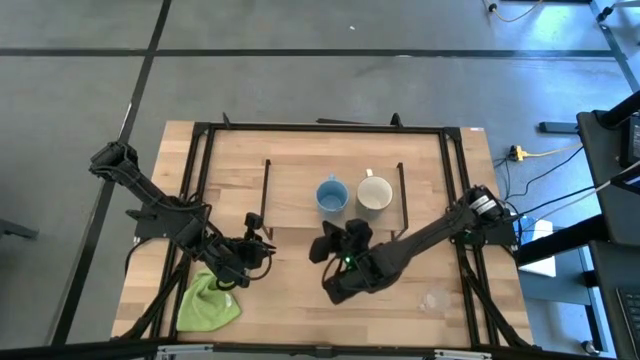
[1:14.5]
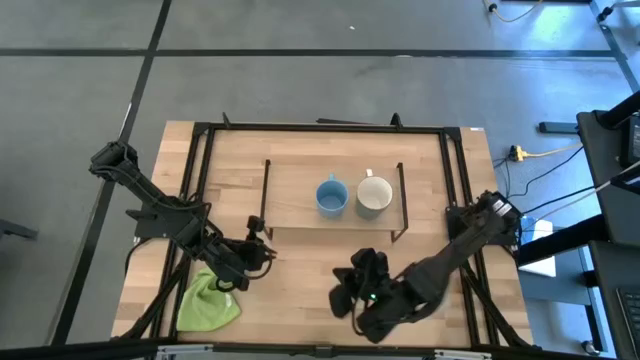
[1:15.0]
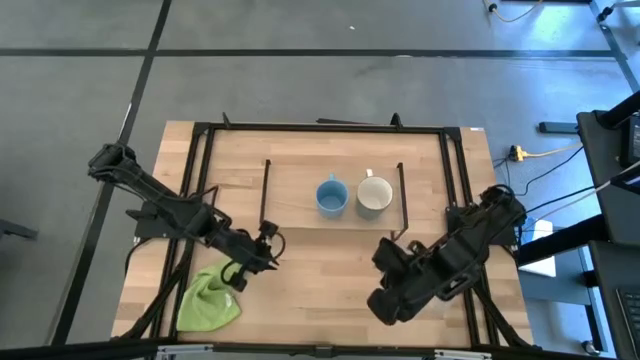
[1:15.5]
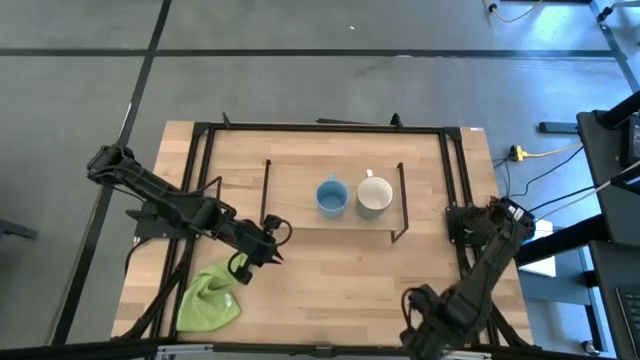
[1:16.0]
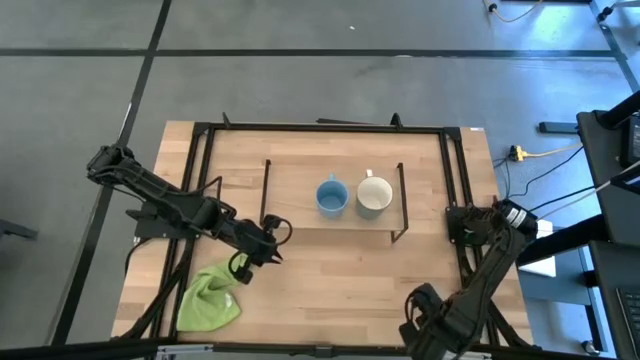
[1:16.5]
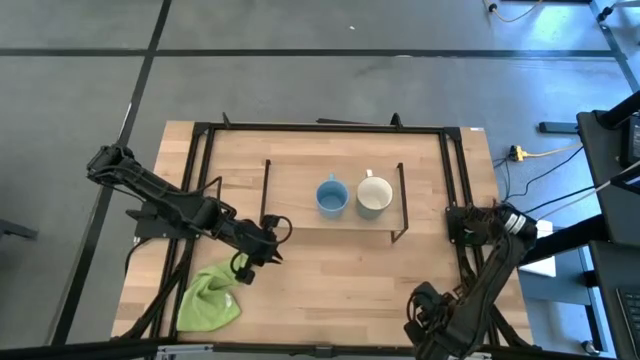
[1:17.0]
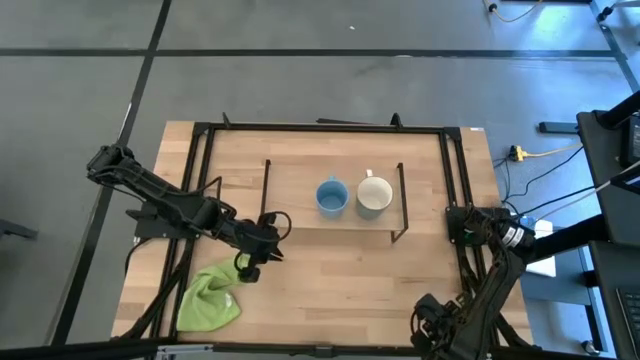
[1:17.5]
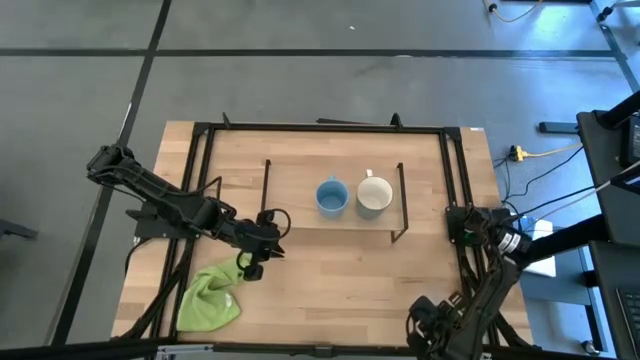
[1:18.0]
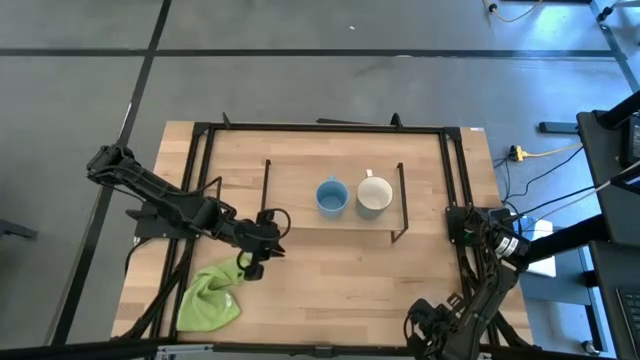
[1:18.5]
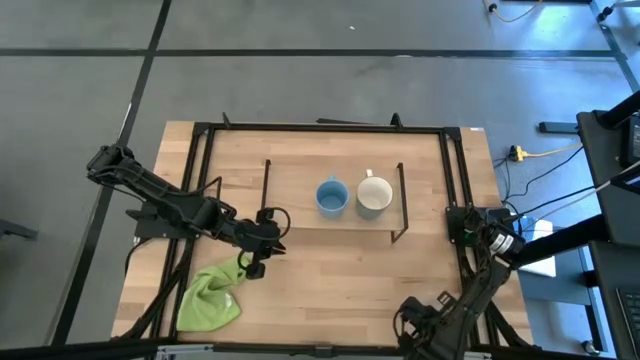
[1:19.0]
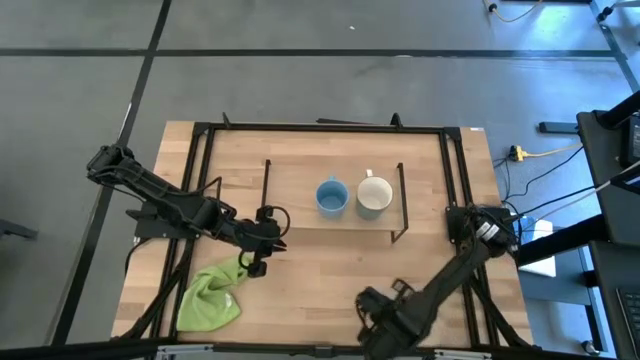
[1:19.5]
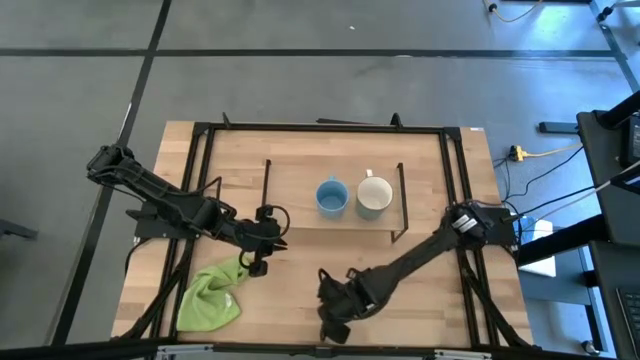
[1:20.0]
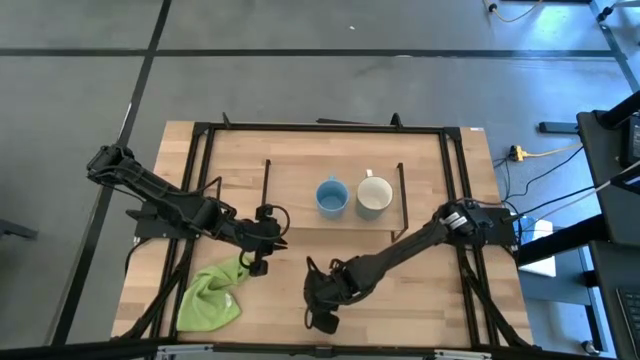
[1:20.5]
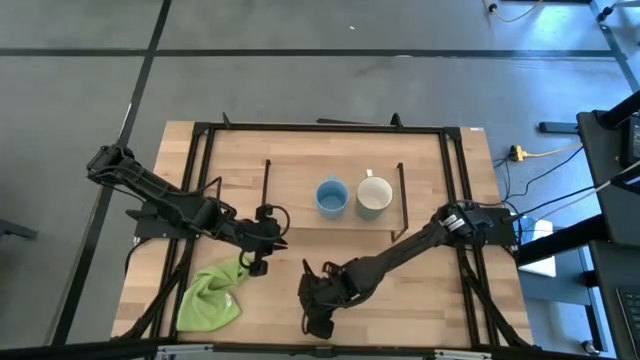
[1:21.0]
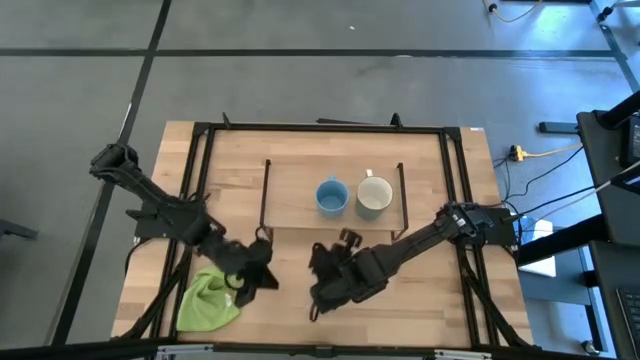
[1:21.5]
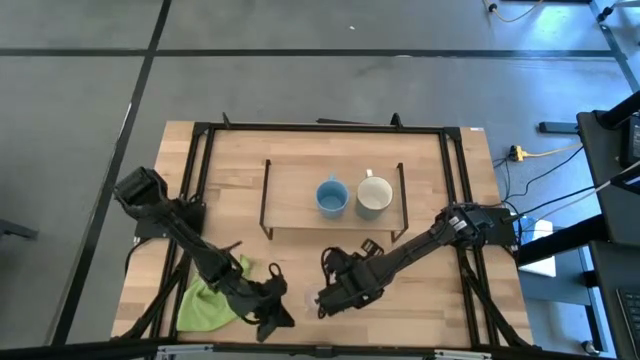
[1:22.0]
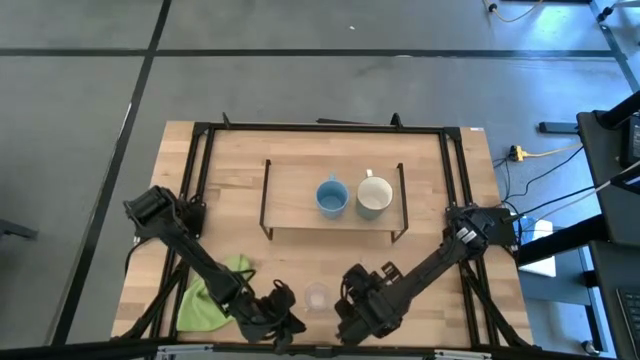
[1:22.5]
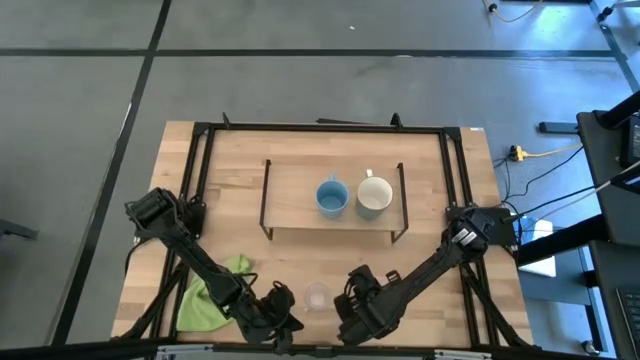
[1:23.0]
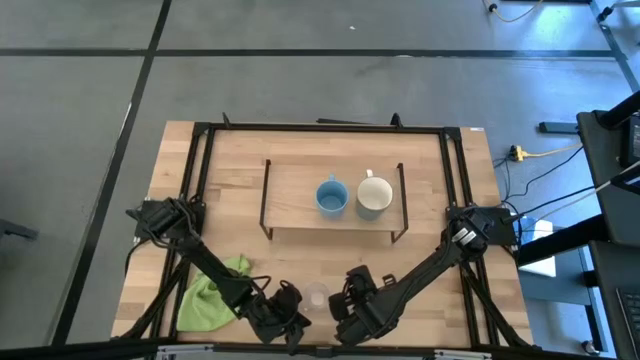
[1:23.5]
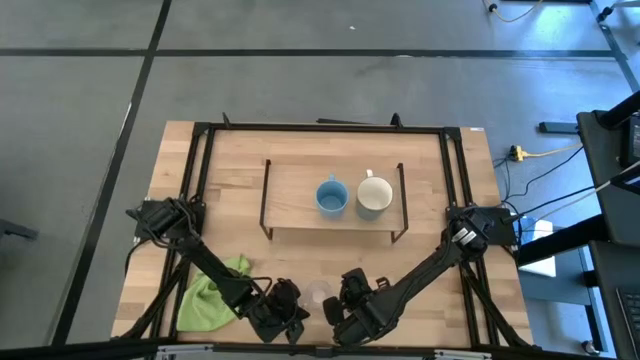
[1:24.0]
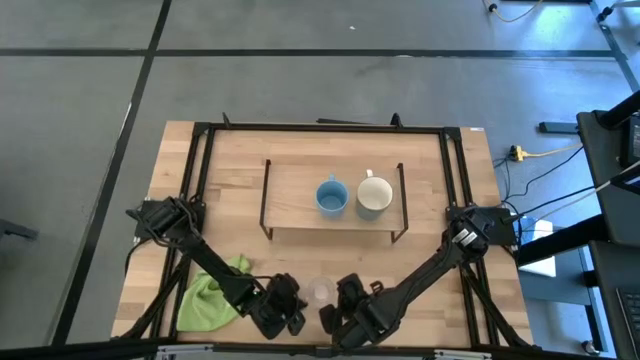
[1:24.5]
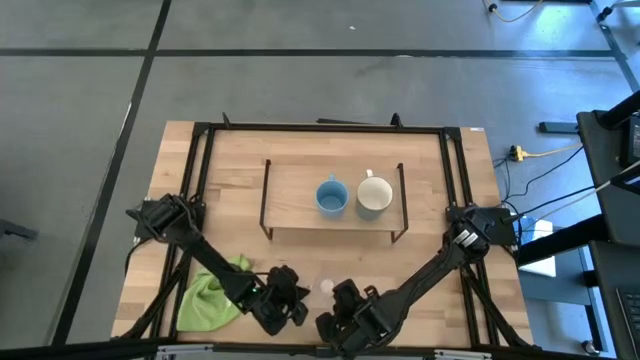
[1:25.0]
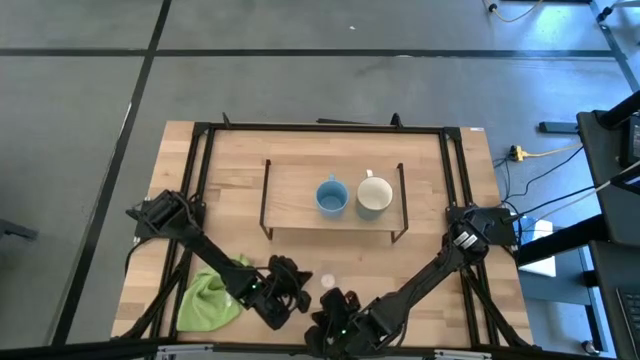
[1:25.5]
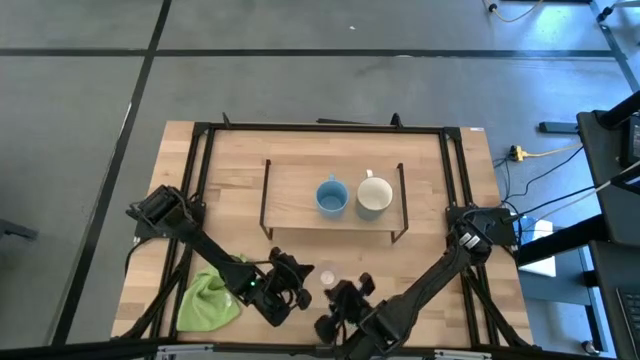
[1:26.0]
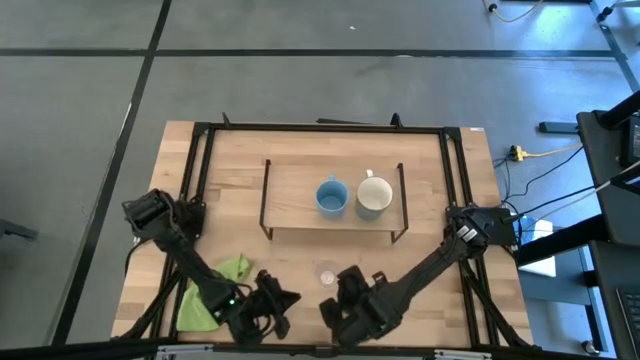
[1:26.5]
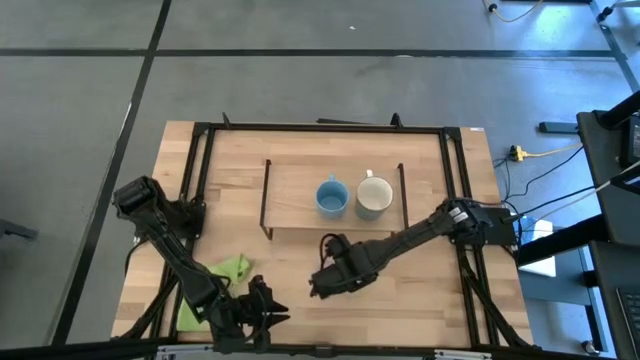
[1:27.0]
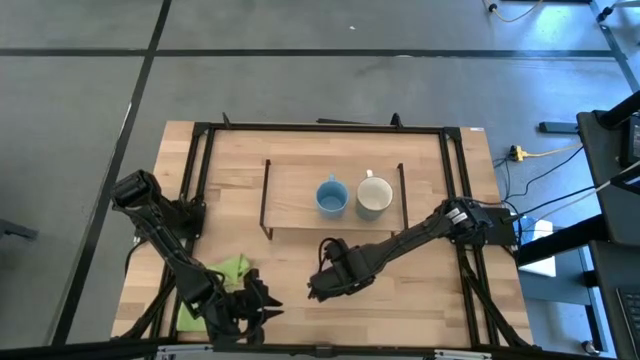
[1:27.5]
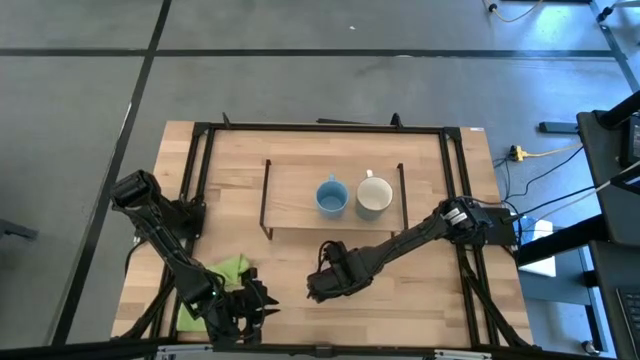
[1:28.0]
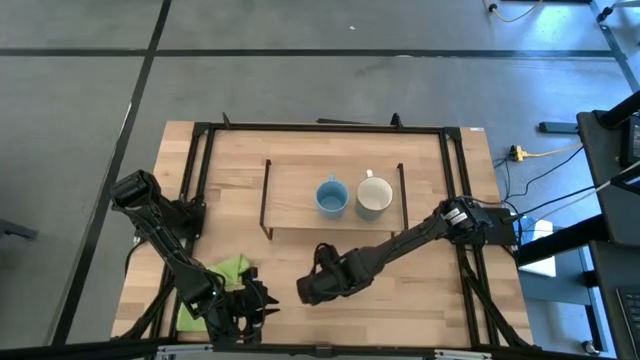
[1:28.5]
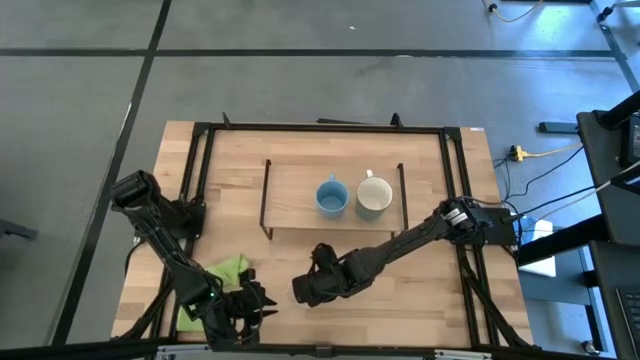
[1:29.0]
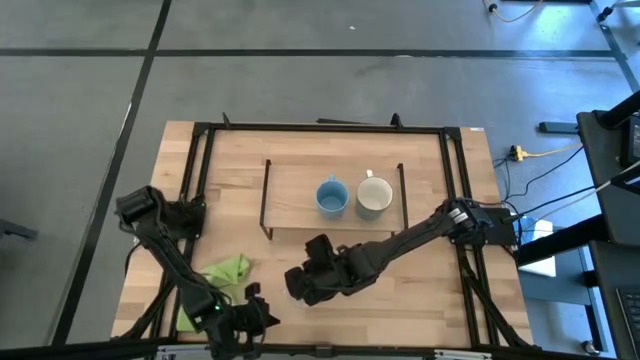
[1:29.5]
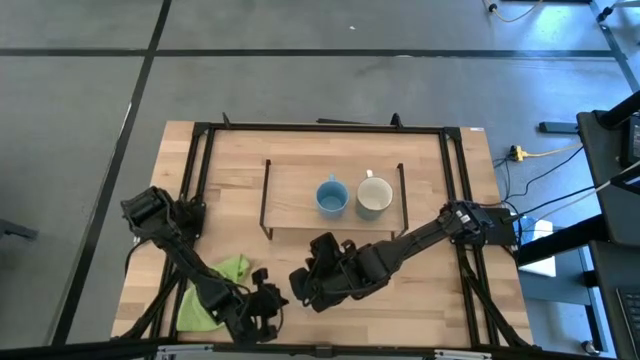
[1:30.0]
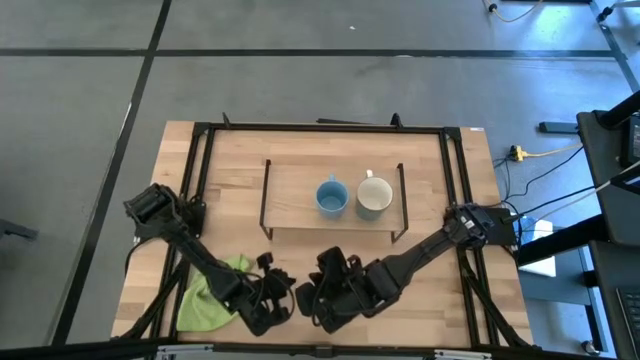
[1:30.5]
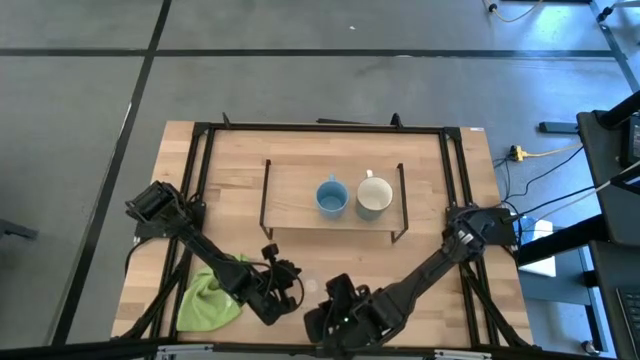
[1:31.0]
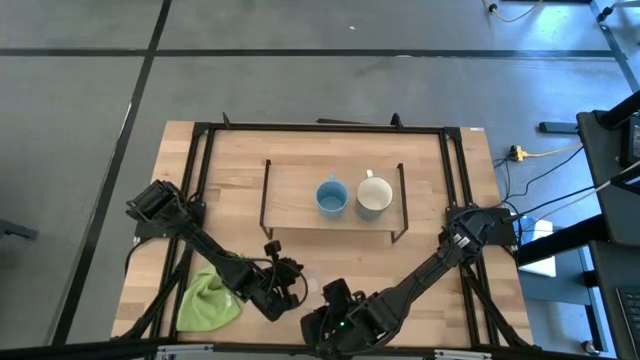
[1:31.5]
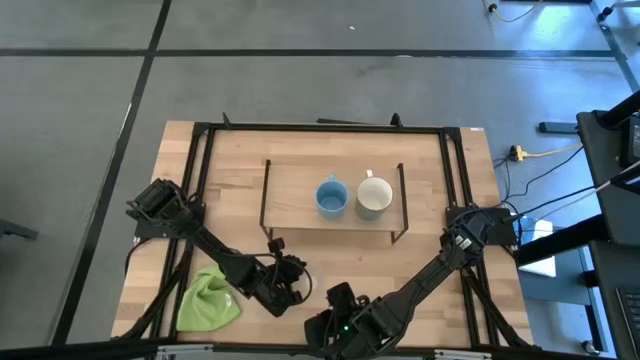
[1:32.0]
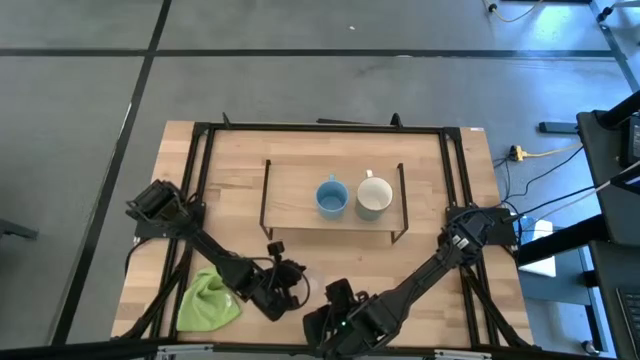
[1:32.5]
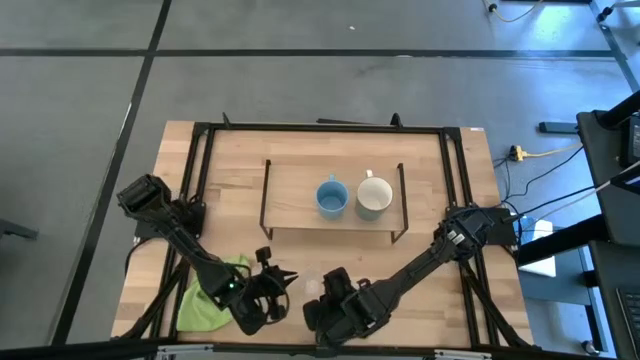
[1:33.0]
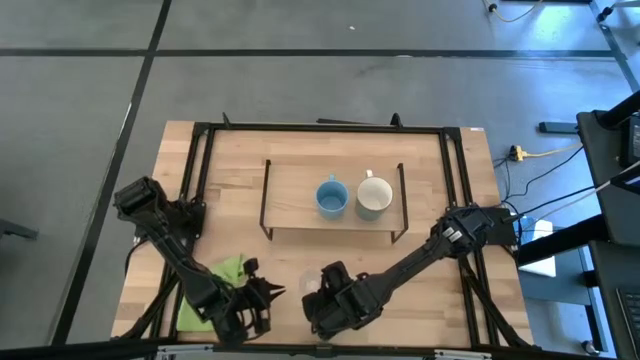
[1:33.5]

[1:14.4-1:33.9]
Task: Stack small to large cups/mugs on shelf
Put the transparent mug on the shelf

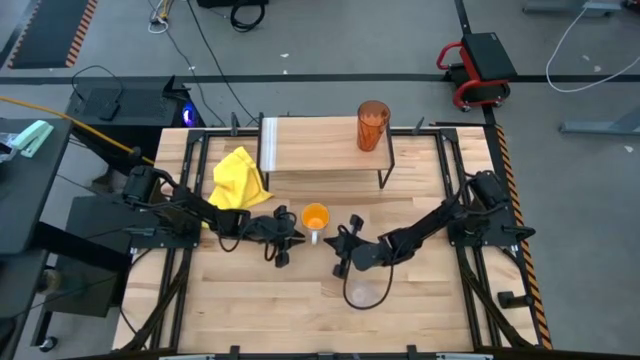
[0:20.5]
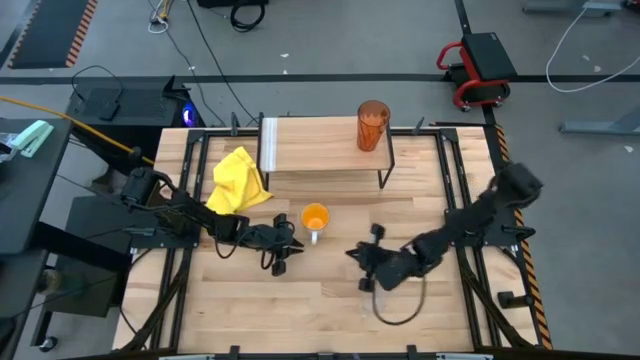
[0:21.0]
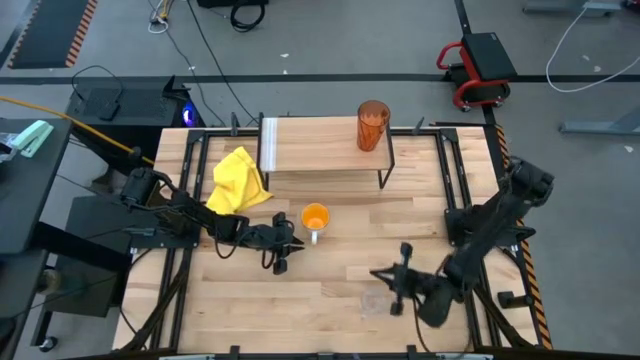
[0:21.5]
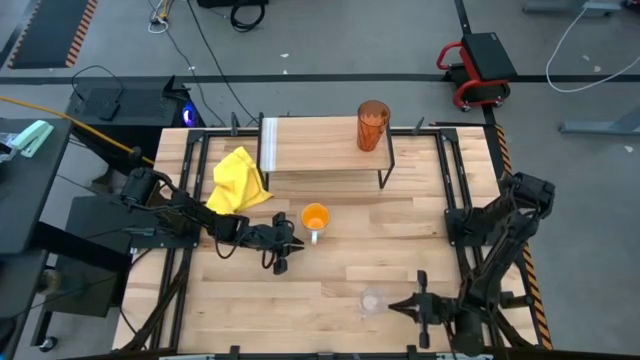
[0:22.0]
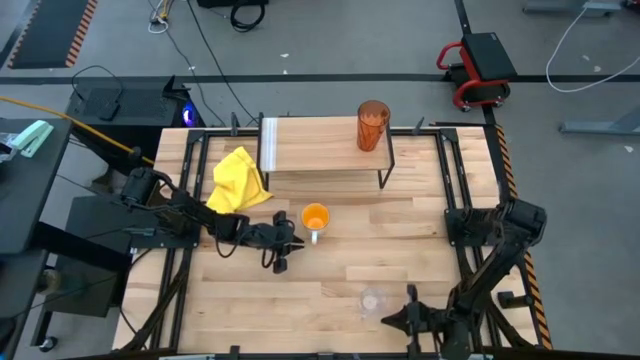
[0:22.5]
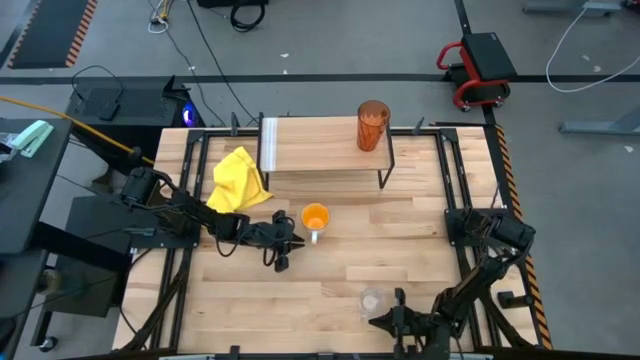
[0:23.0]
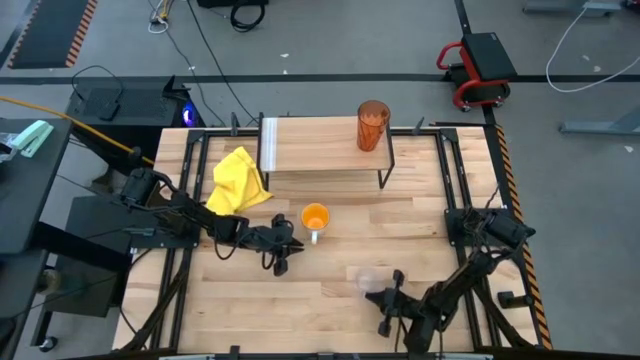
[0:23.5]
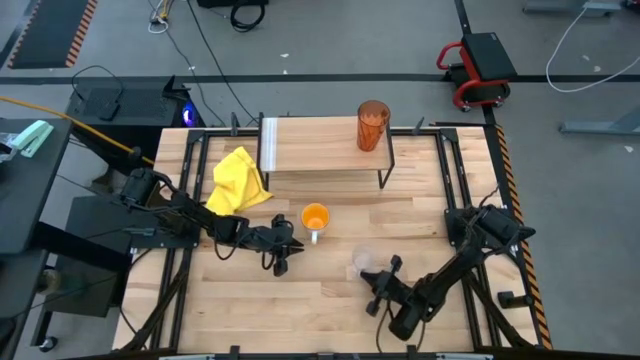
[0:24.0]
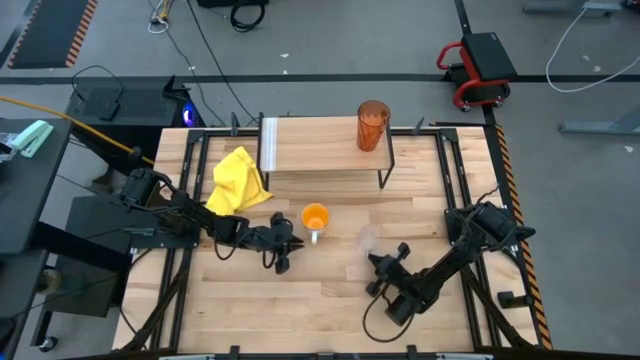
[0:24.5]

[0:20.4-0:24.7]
Task: Stack small to large cups/mugs on shelf
Move the transparent mug to the center of the table
